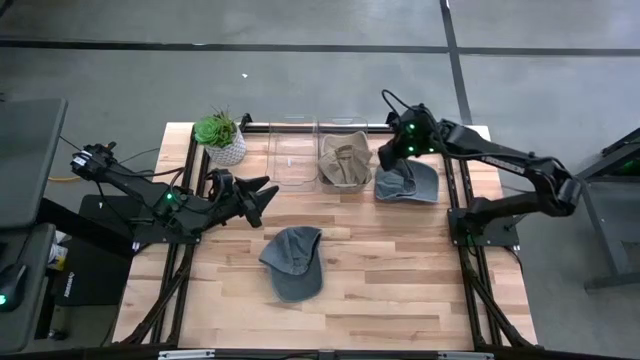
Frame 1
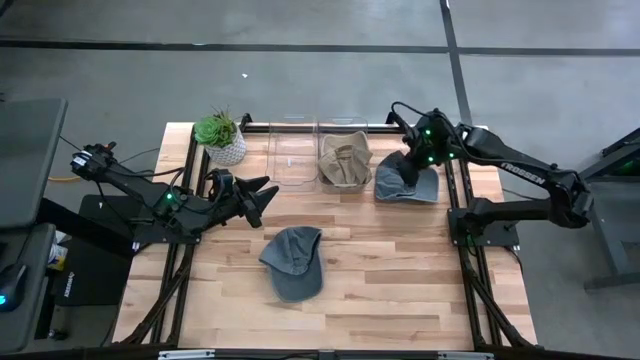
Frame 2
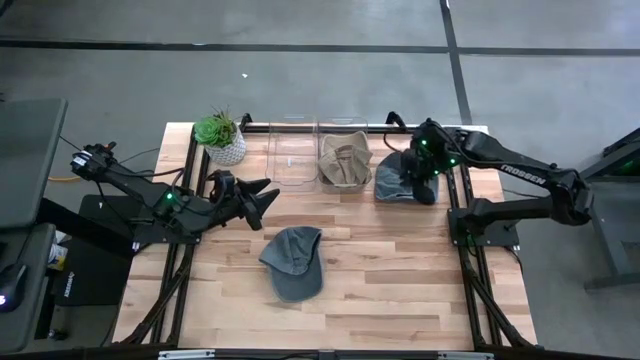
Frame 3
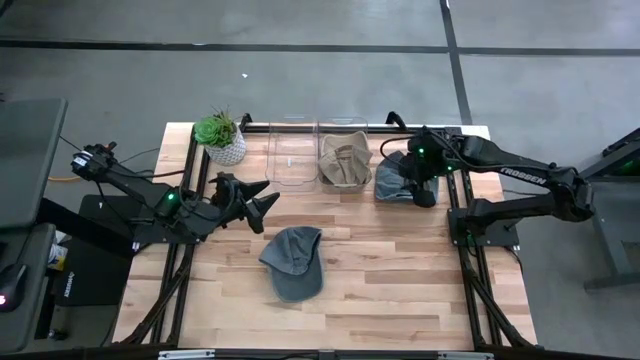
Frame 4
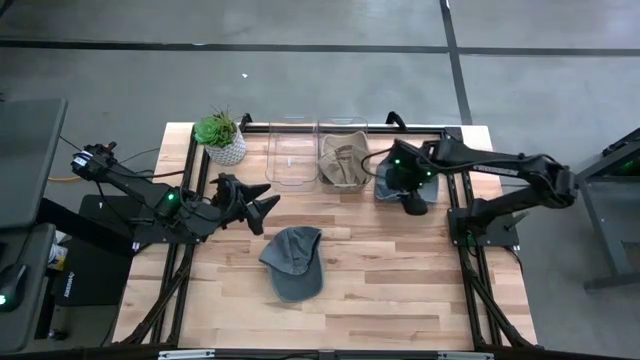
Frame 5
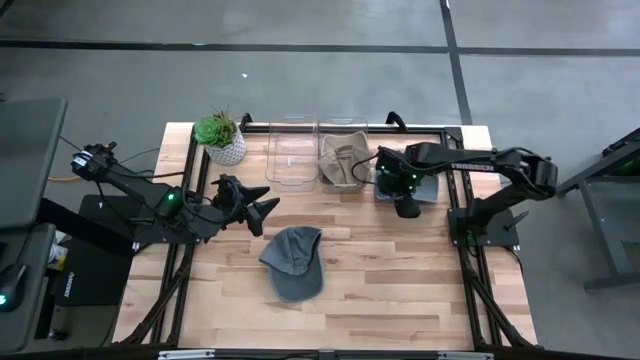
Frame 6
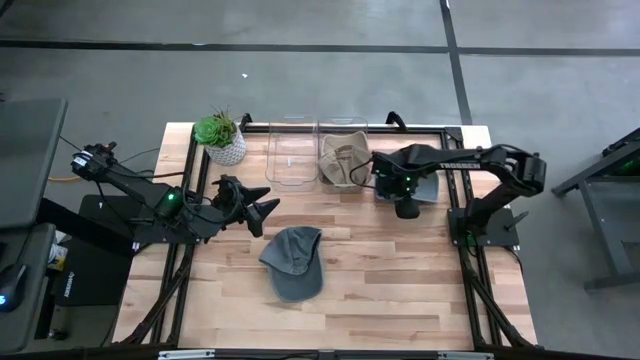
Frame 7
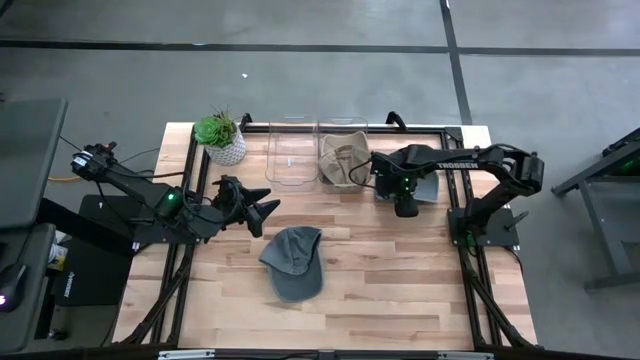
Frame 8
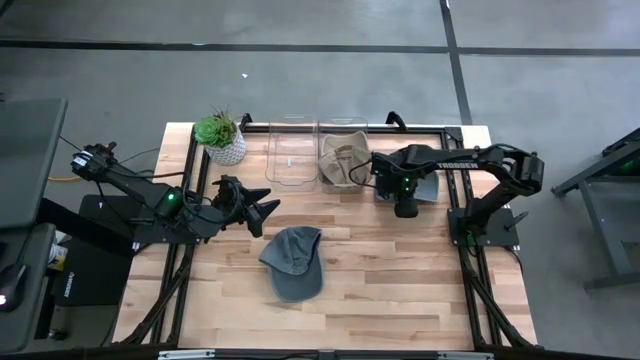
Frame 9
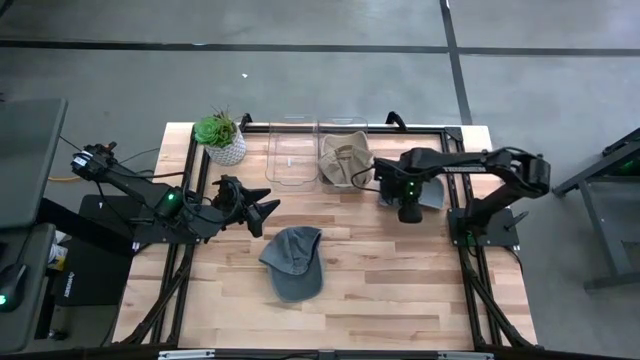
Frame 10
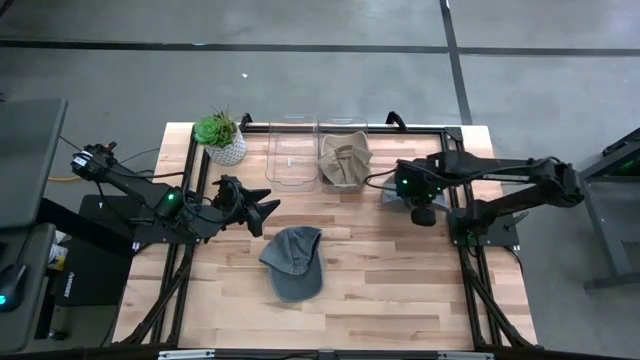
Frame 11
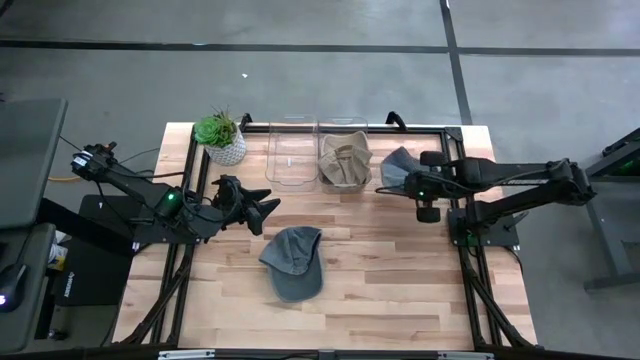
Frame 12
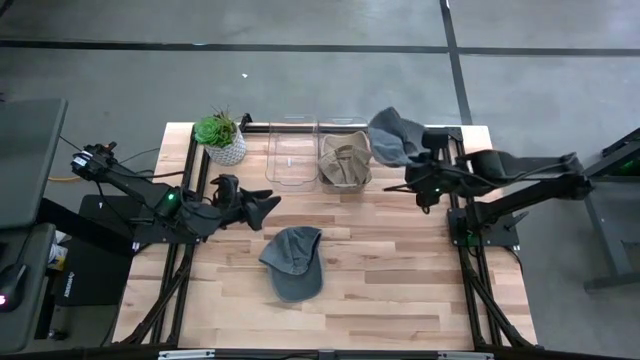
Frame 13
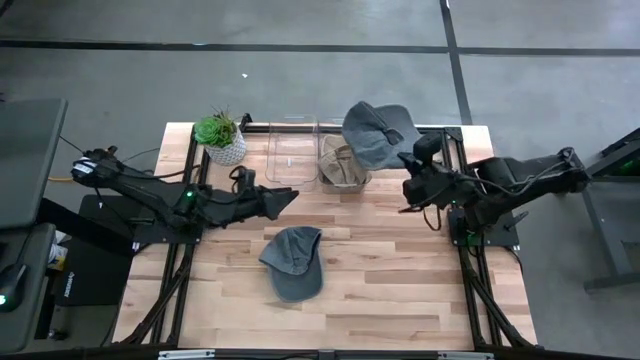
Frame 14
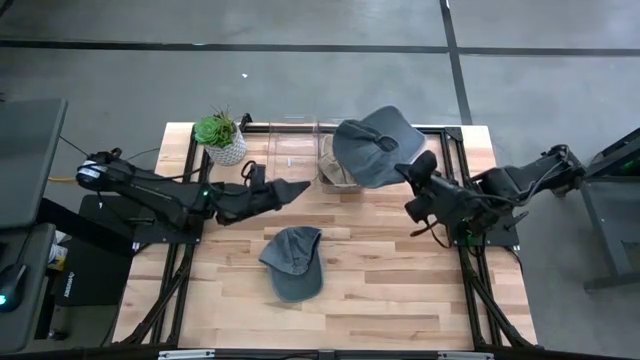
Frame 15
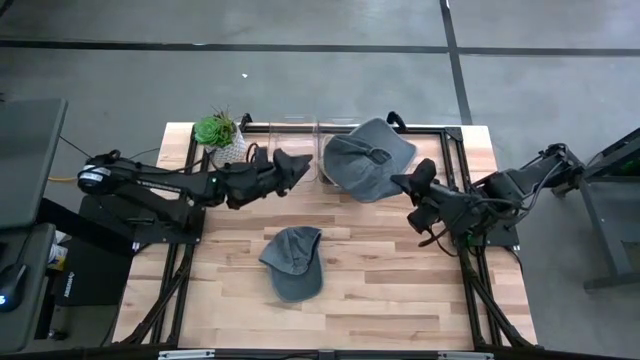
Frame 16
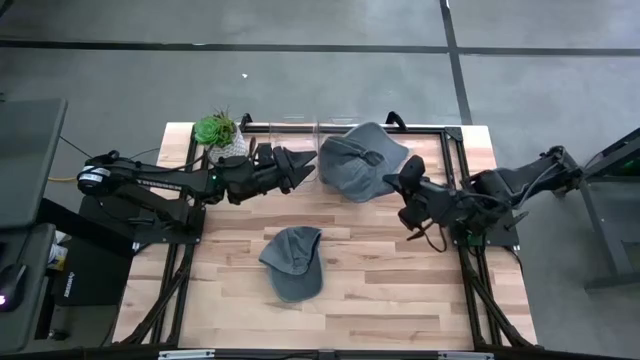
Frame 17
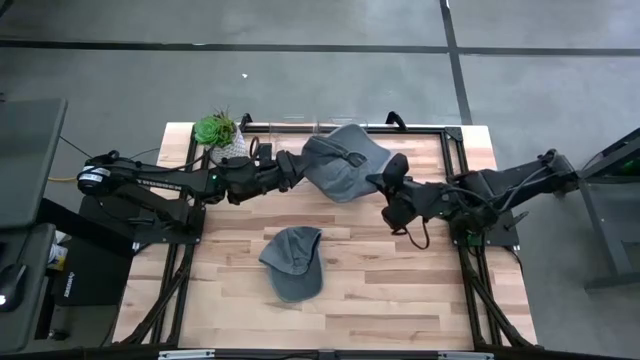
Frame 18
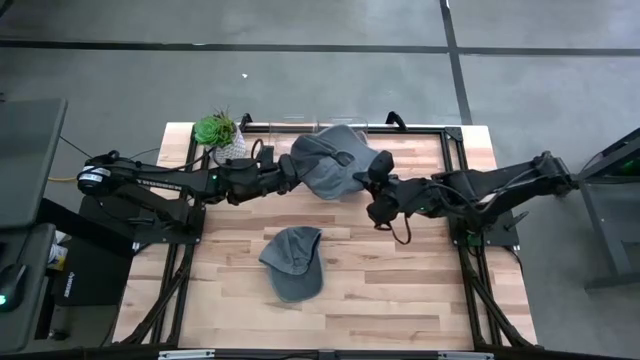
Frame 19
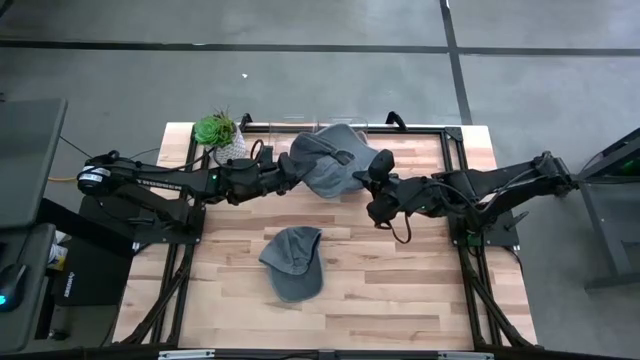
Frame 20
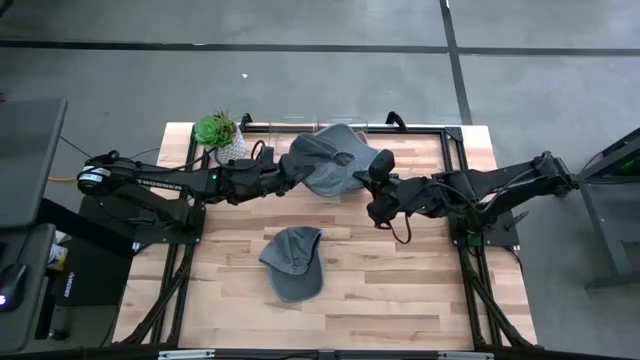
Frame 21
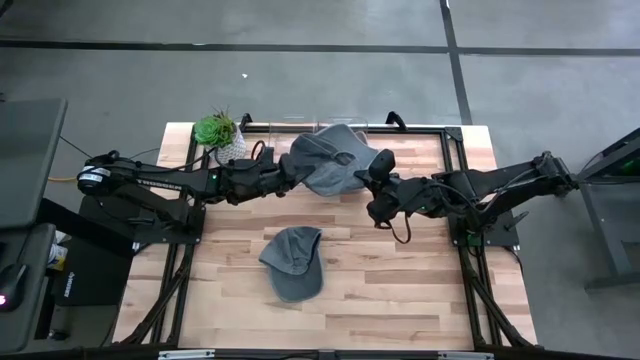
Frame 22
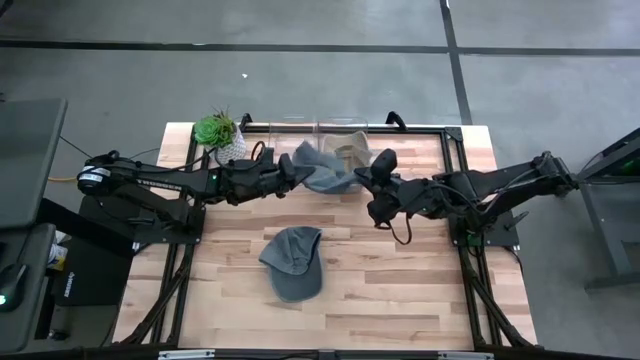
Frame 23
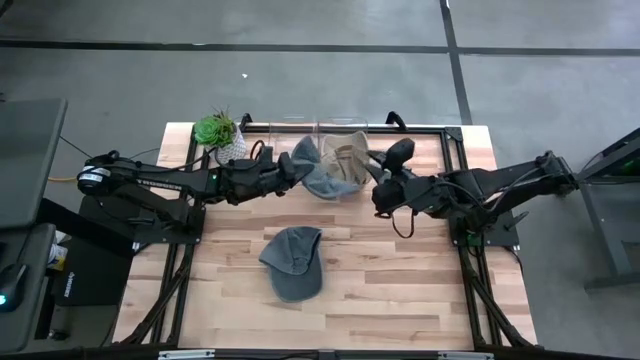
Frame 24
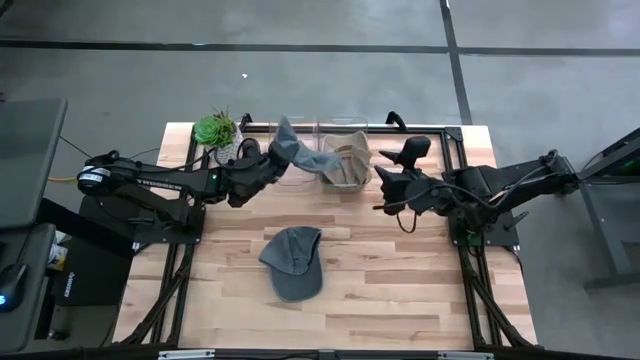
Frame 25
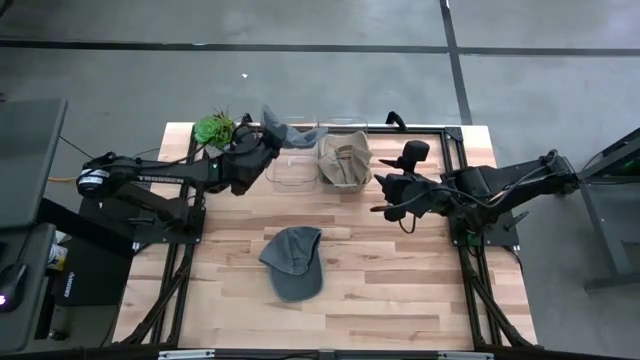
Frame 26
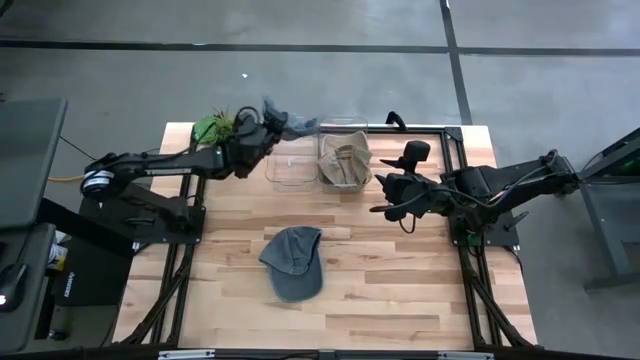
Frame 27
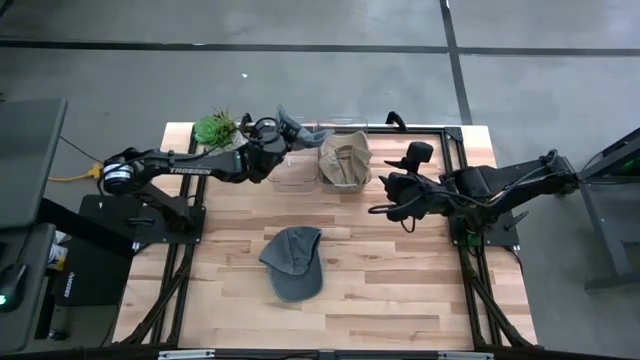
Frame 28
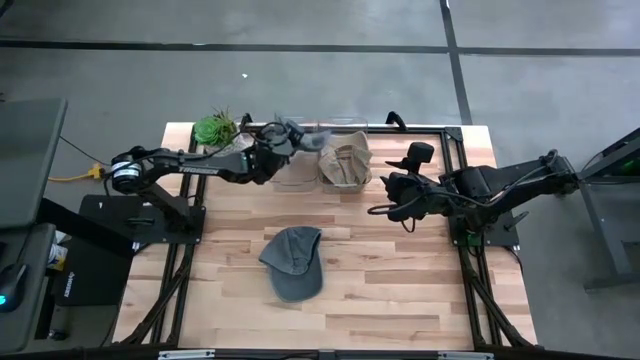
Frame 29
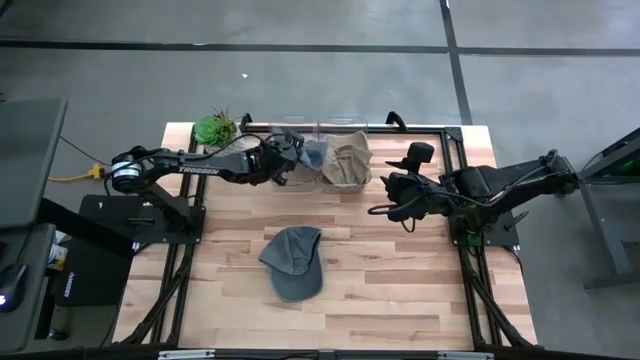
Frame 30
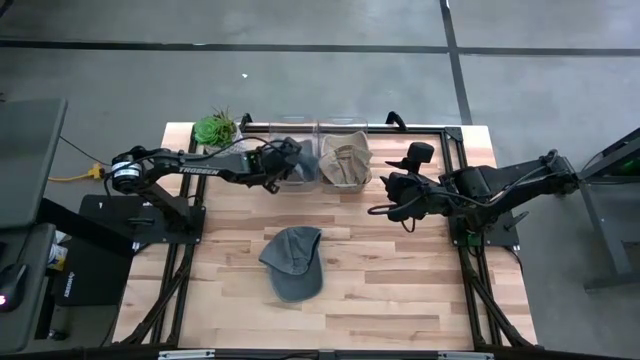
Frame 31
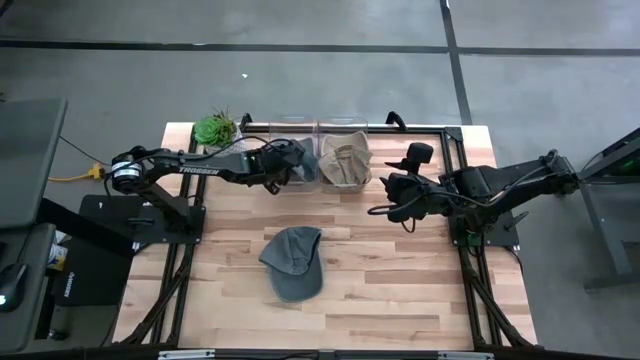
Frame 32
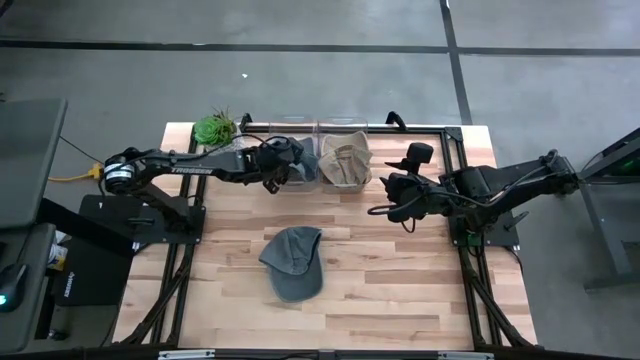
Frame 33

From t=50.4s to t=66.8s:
Task: Pick & Place hat
Put the top gray cap into the left transparent bin

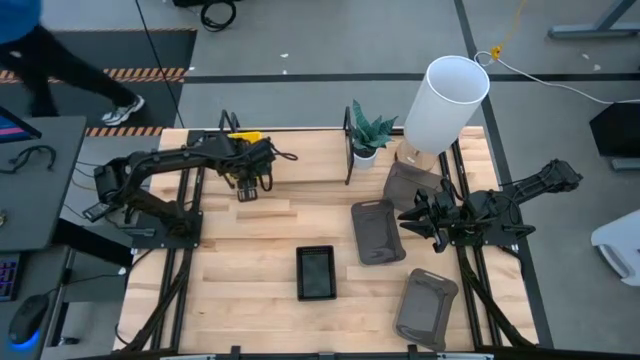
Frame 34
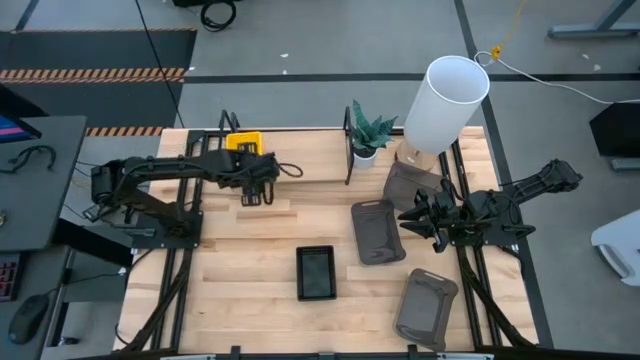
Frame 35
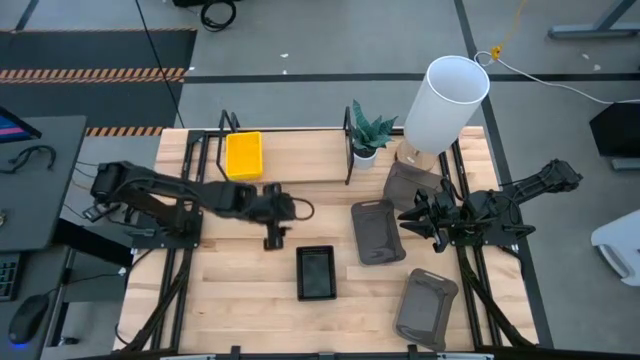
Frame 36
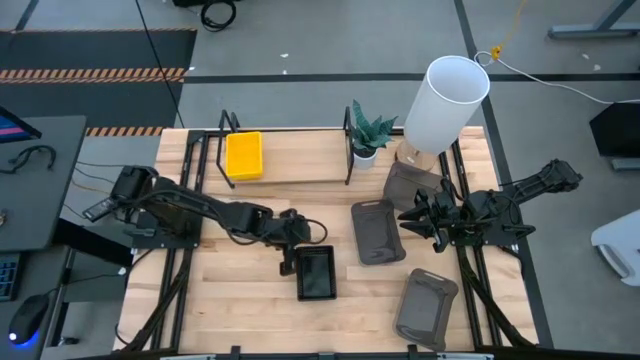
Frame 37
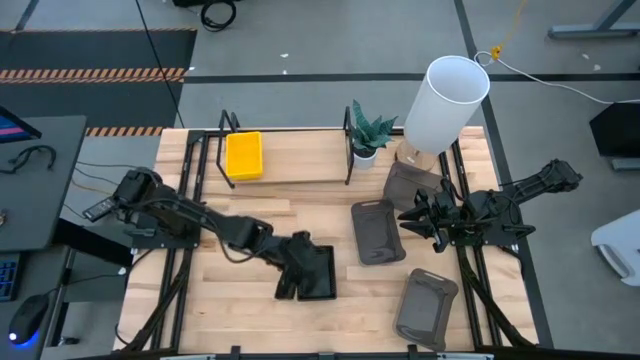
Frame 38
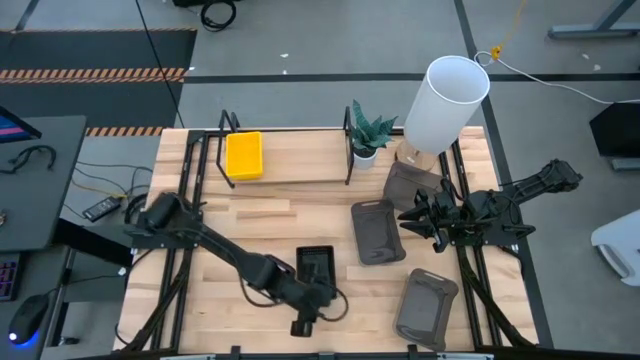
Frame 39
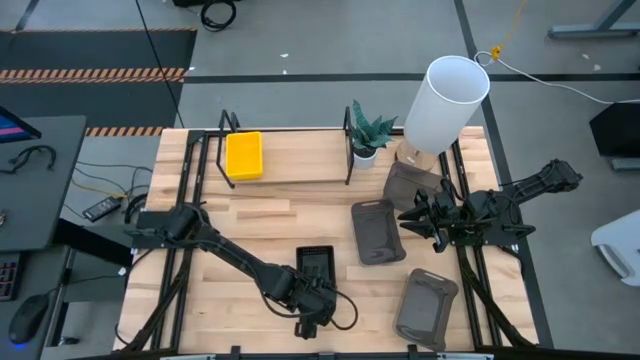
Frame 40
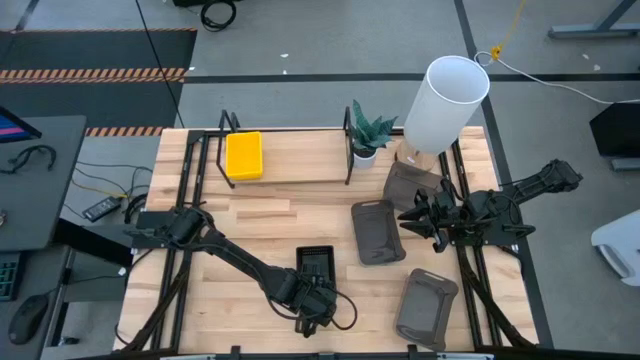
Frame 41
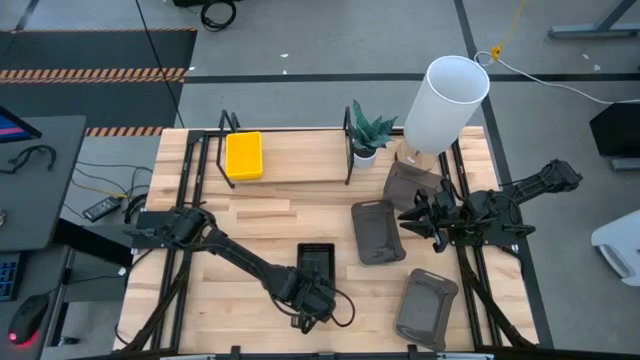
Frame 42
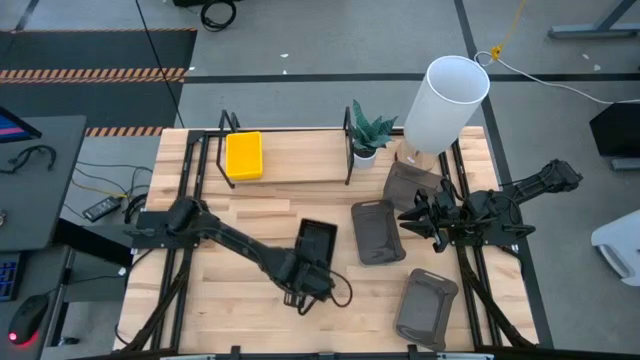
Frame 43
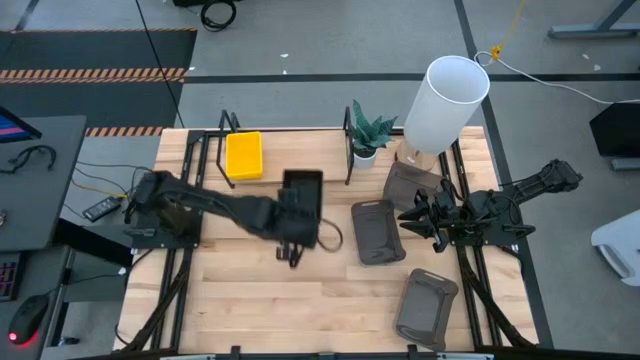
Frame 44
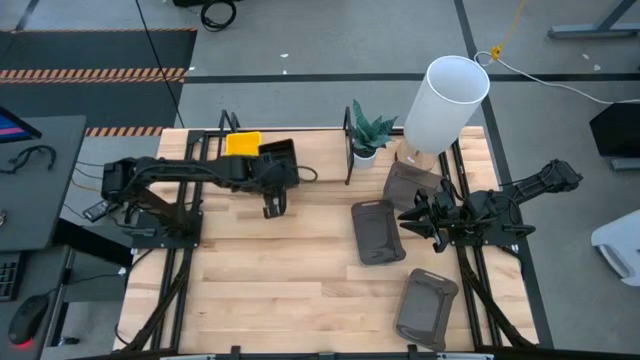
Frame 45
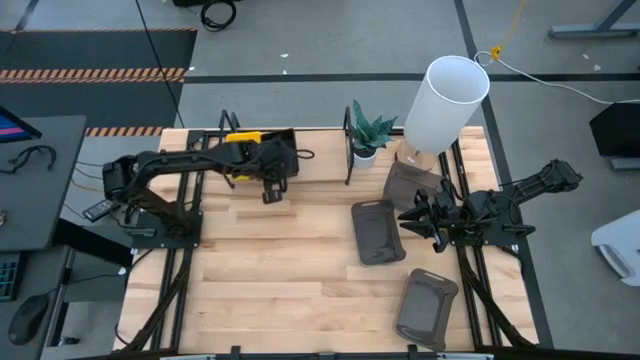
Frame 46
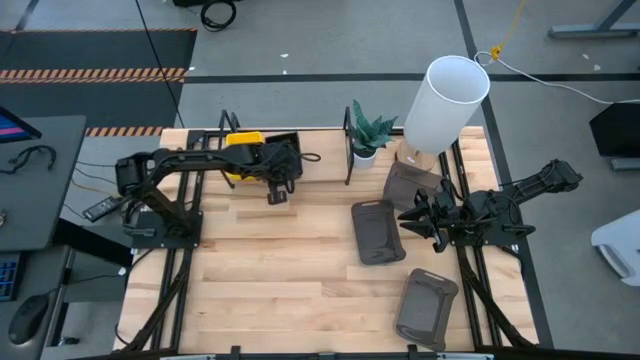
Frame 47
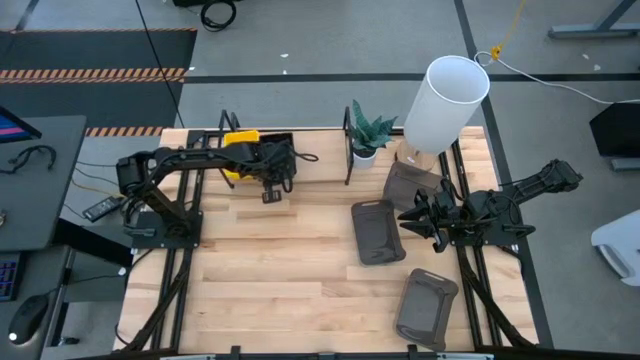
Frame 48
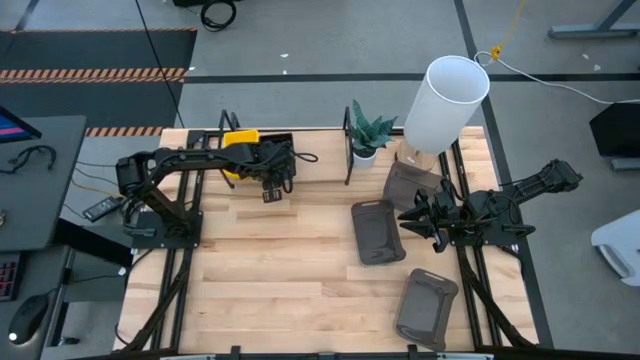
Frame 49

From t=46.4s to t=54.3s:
Task: Stack baskets on shelf by color
Put the black bins on the shelf
